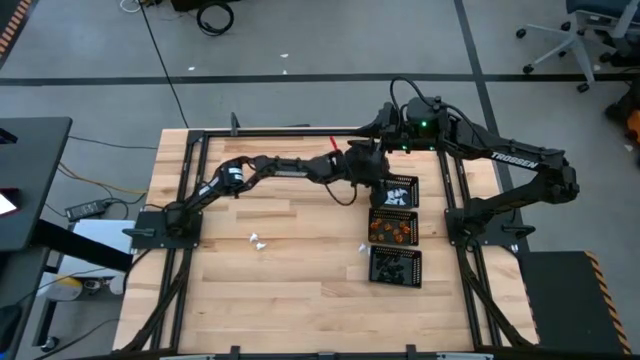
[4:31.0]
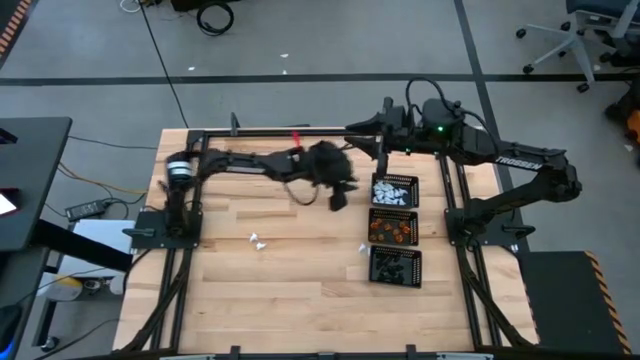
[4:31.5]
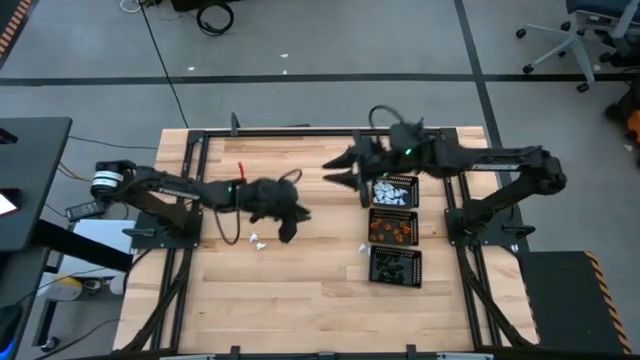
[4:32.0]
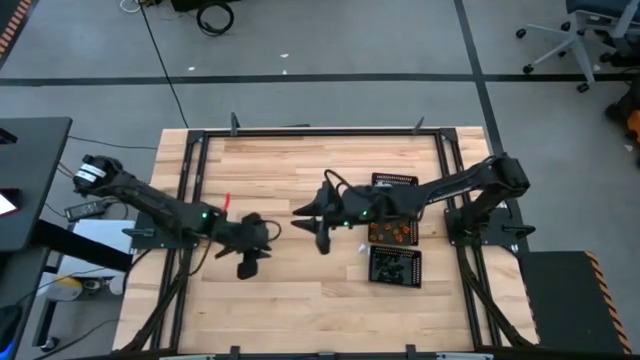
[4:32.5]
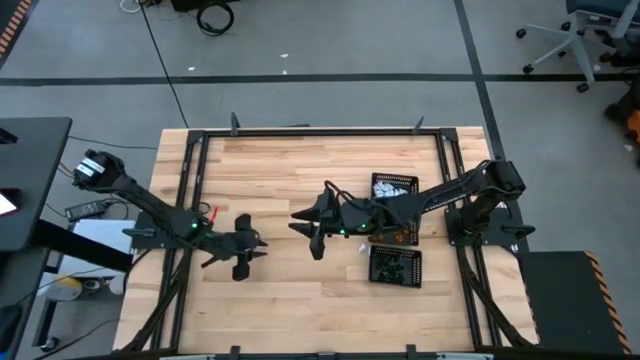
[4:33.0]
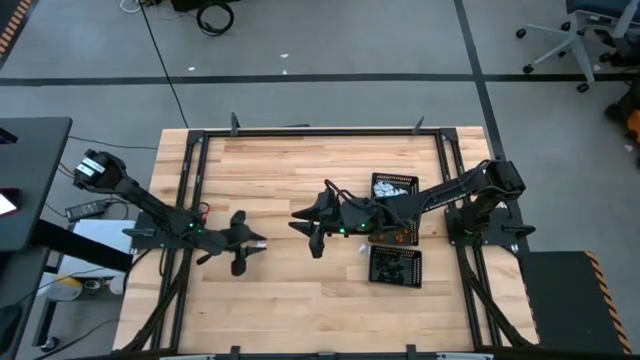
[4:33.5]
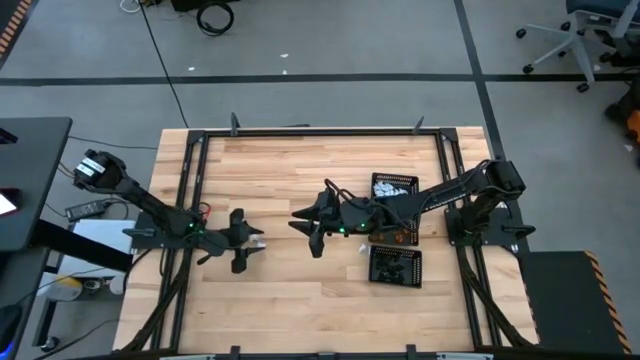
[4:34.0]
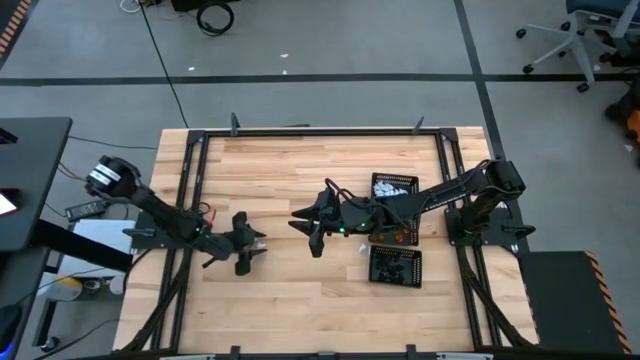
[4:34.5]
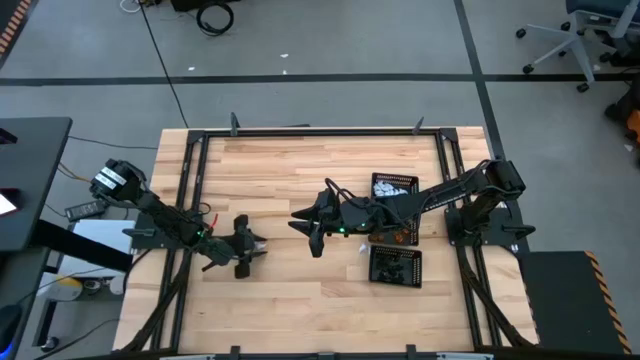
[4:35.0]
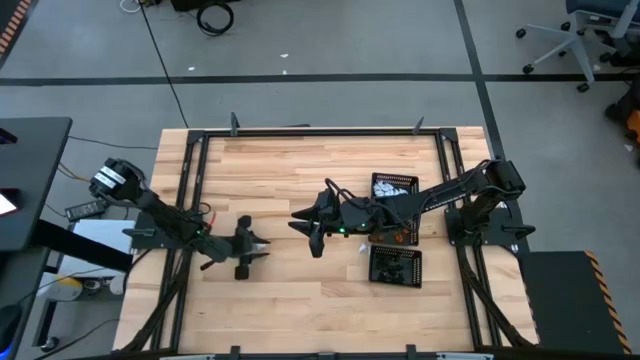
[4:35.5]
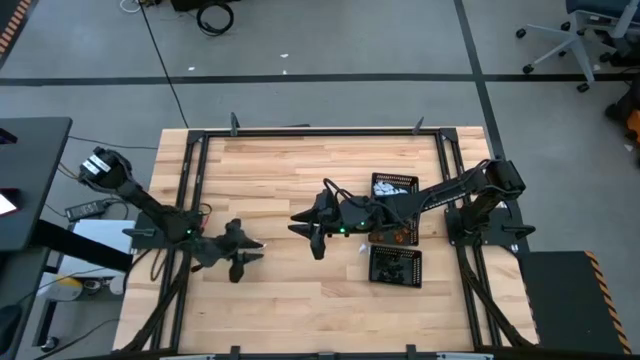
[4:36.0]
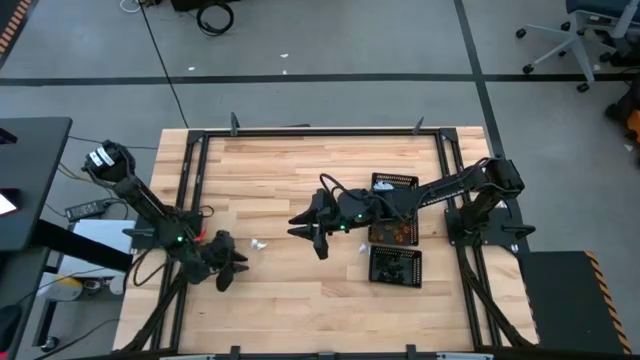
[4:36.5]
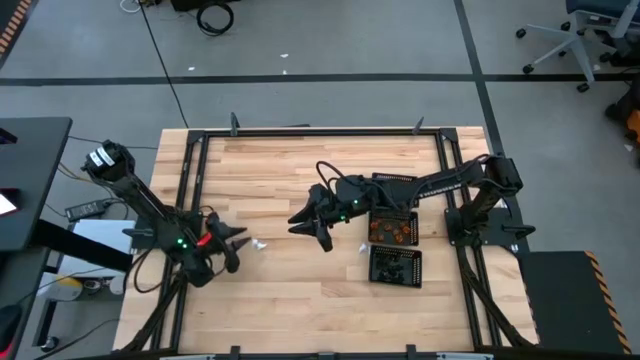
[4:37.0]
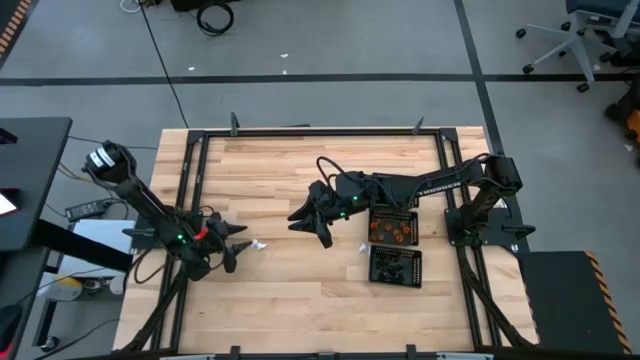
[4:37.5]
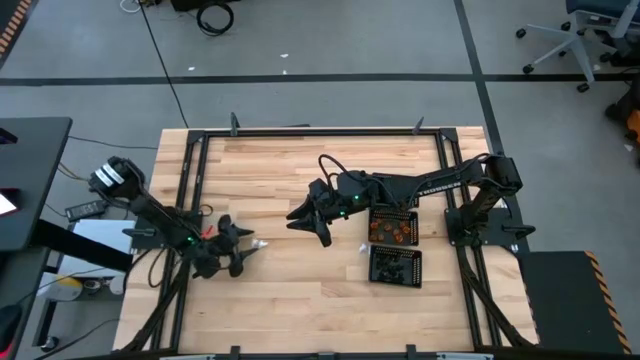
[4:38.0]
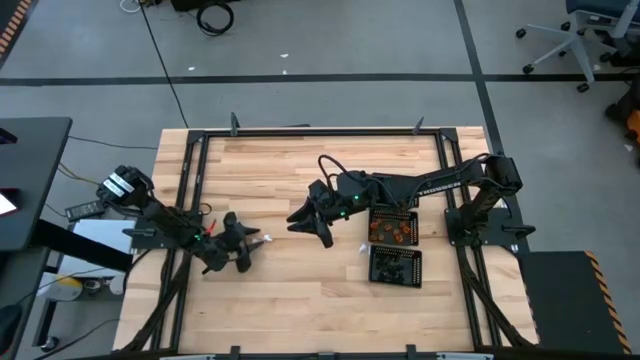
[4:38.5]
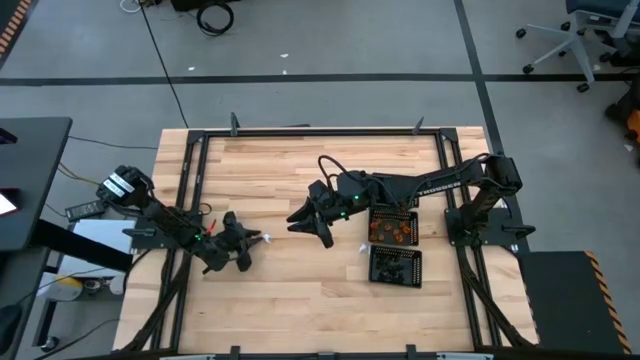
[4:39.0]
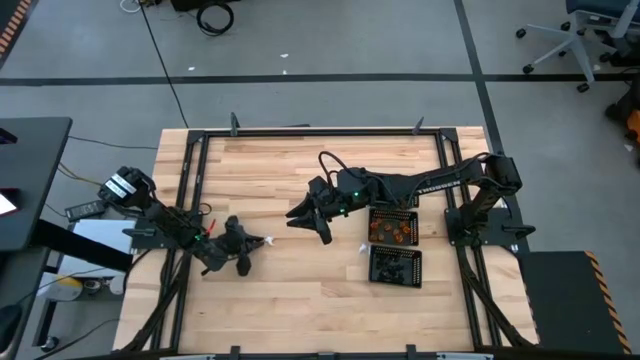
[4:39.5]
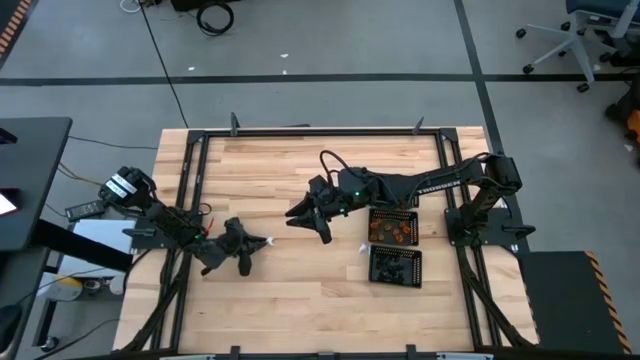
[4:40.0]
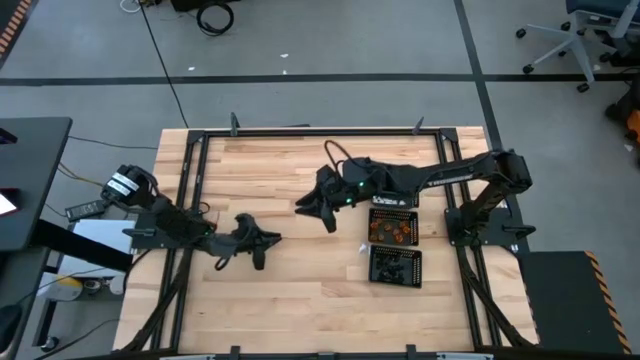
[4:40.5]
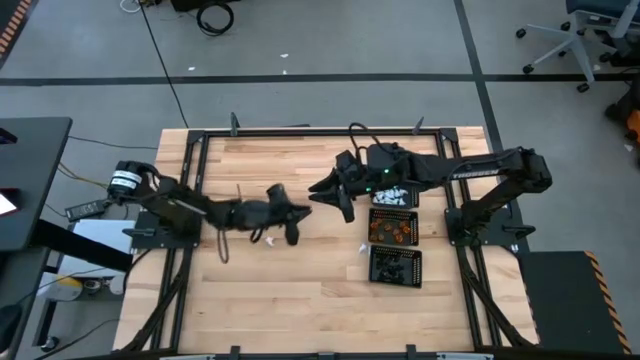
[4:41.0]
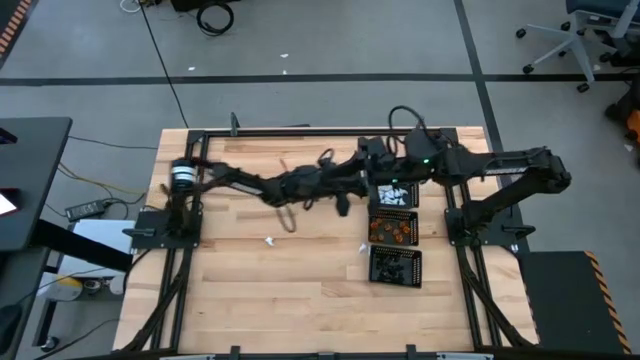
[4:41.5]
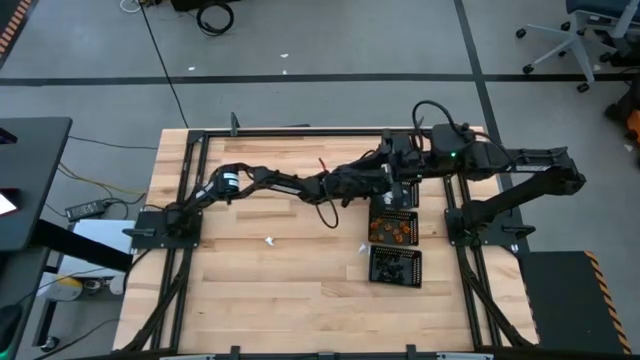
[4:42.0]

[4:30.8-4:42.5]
Task: Sort Halloween decoration
Put the white ghost toy into the top black bin

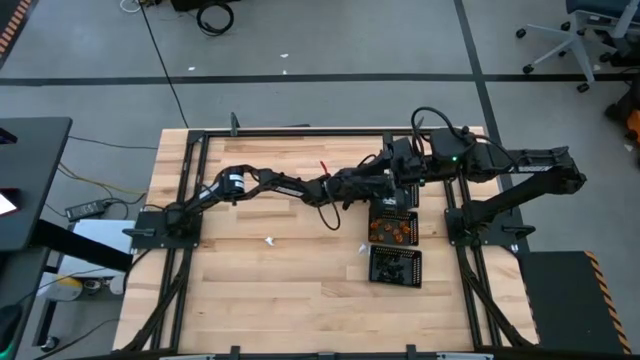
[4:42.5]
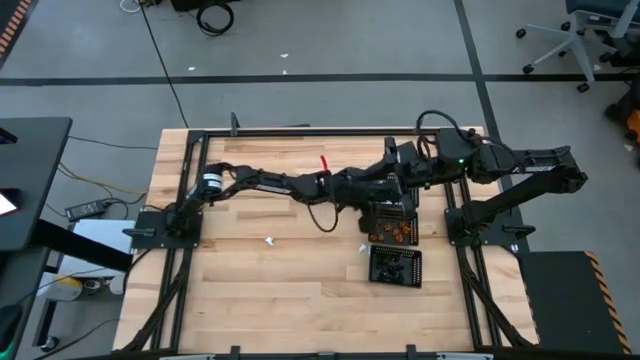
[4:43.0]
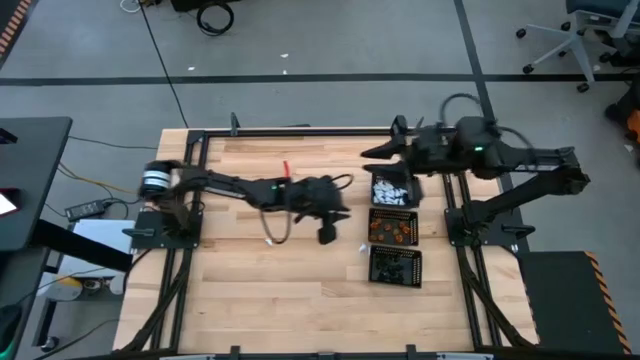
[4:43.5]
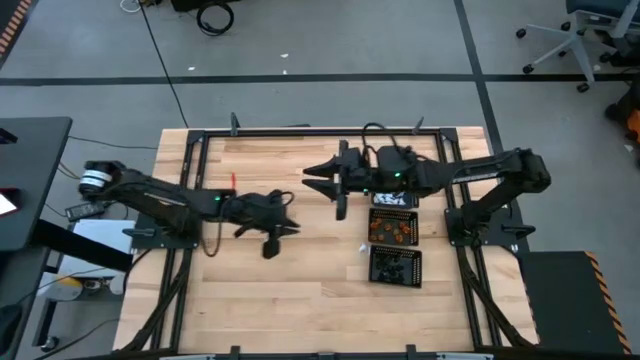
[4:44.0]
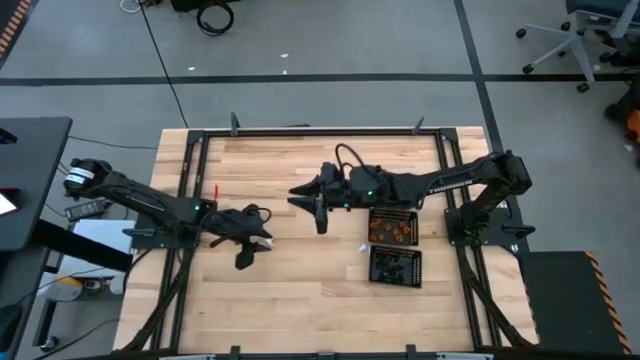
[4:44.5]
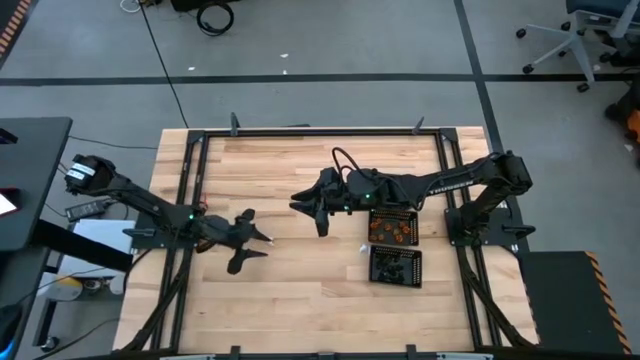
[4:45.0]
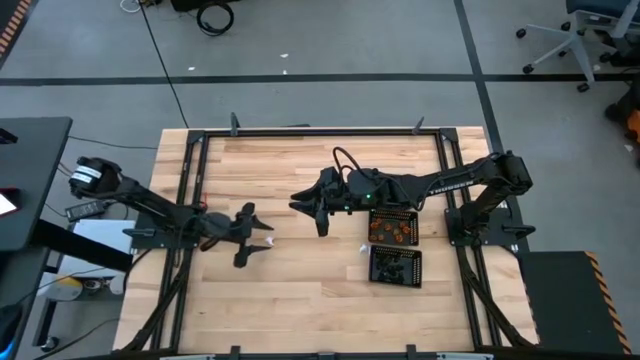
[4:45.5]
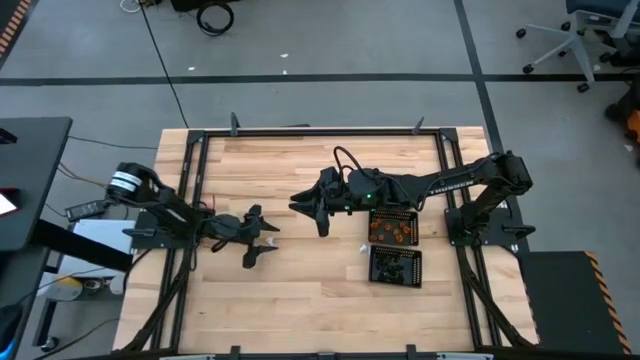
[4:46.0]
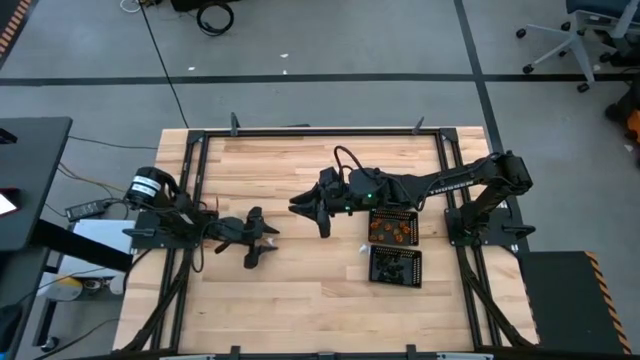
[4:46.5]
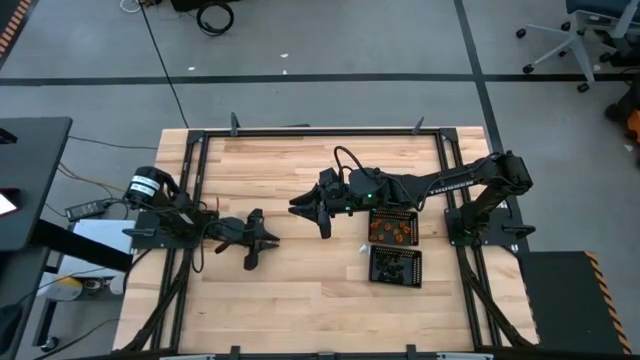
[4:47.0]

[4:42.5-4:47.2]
Put the white ghost toy into the top black bin

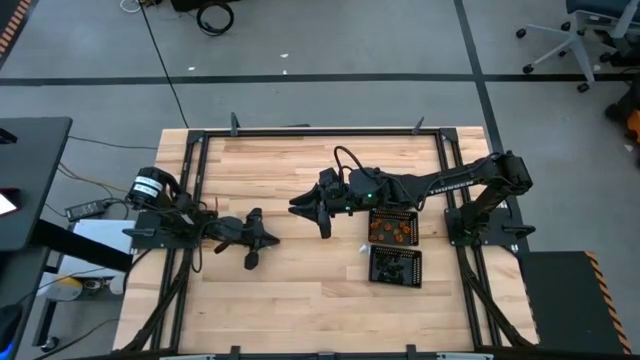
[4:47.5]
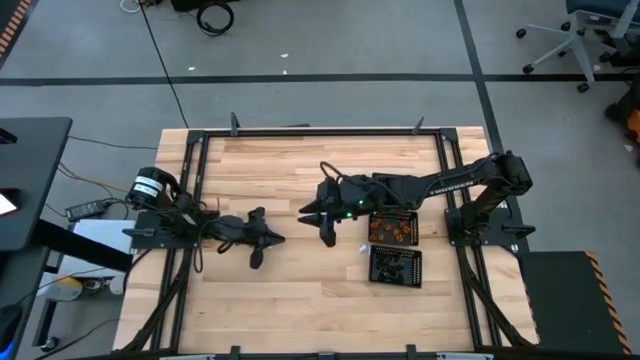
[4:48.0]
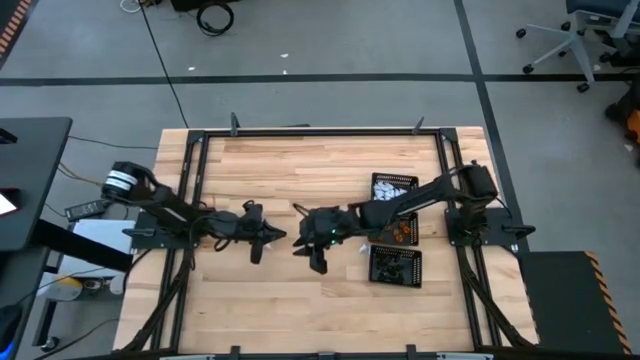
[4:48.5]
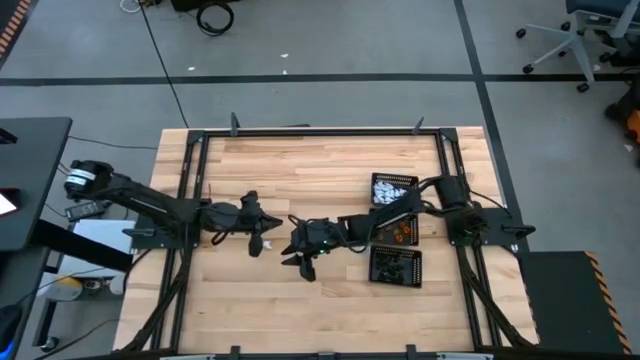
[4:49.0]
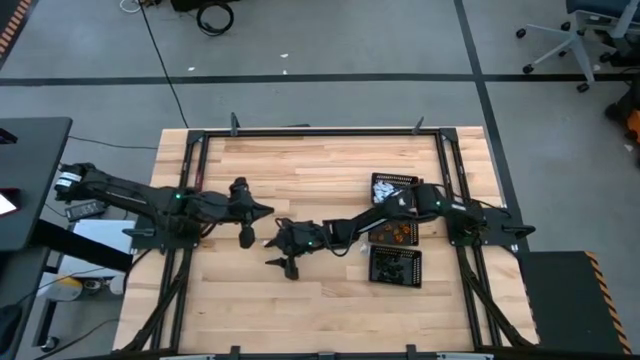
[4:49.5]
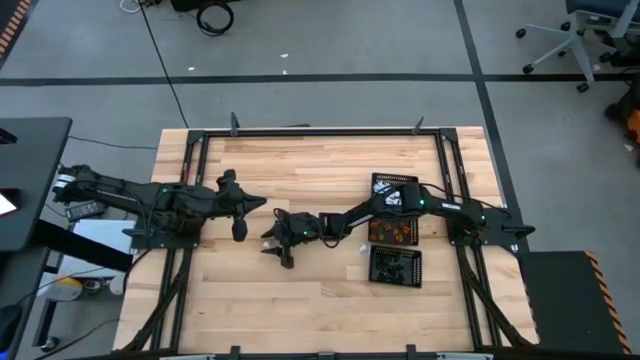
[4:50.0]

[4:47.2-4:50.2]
Put the white ghost toy into the top black bin

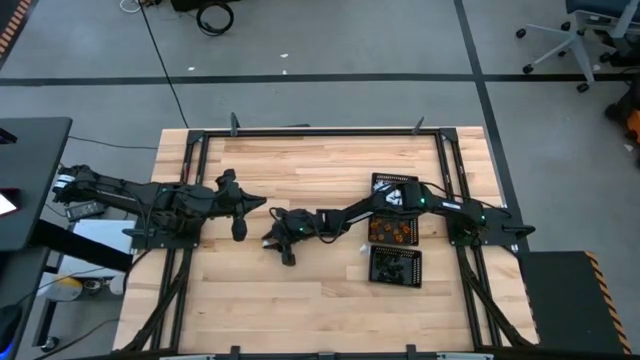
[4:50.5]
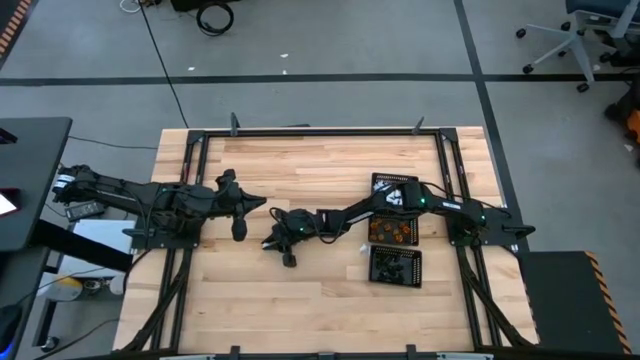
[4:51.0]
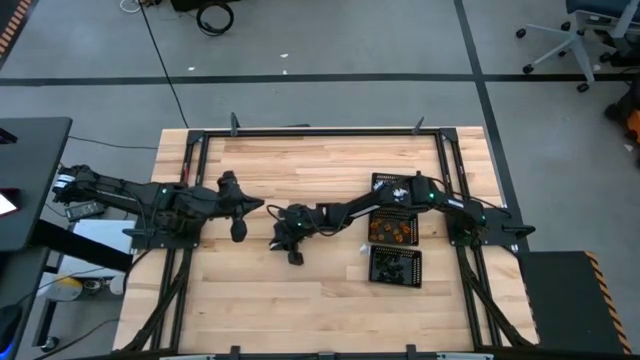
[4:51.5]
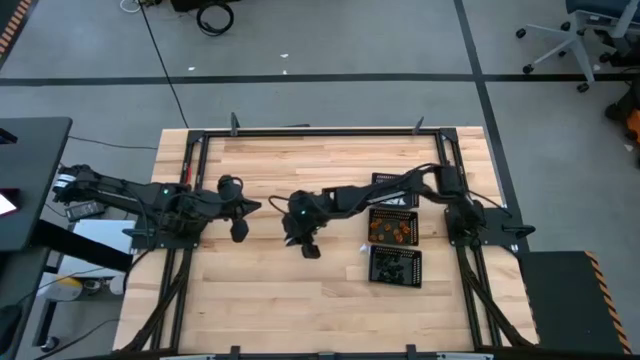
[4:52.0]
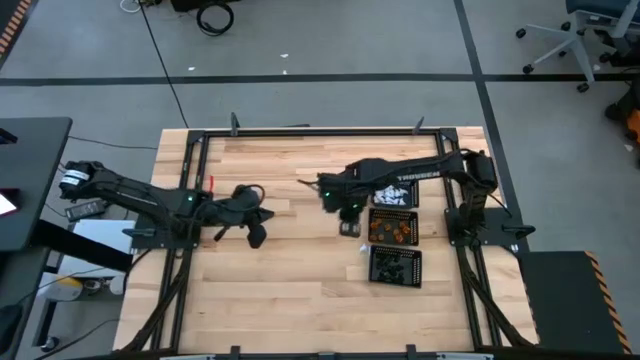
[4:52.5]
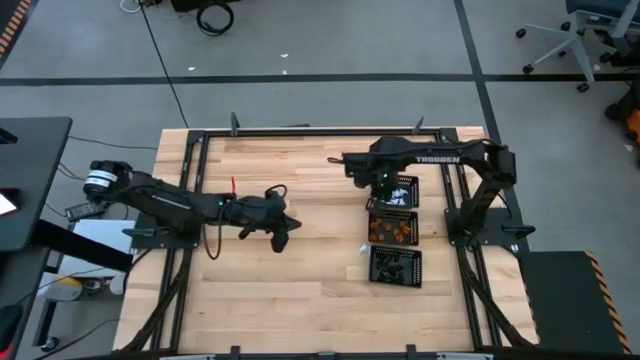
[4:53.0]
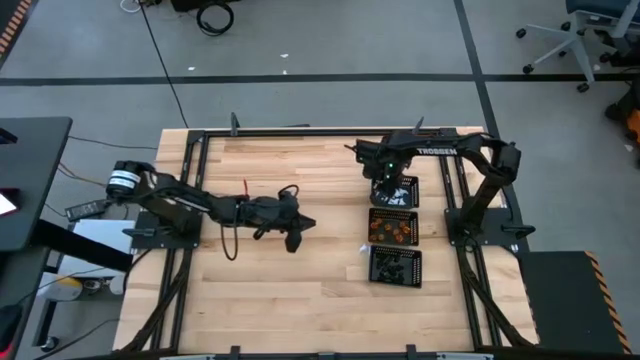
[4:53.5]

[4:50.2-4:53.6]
Put the white ghost toy into the top black bin
